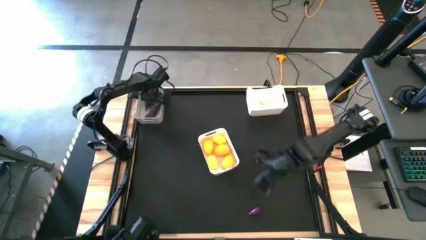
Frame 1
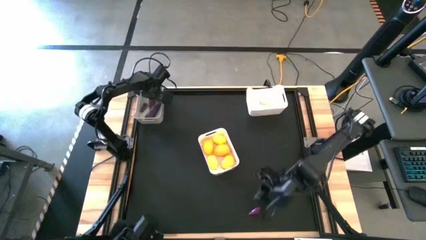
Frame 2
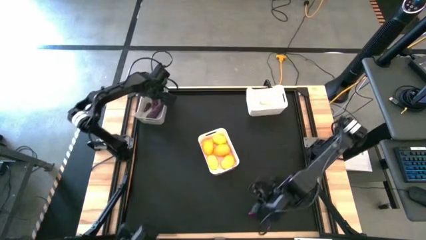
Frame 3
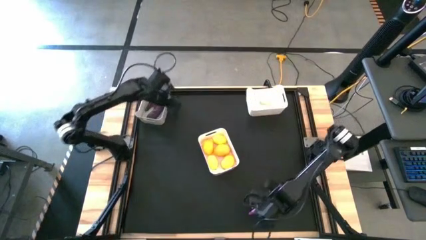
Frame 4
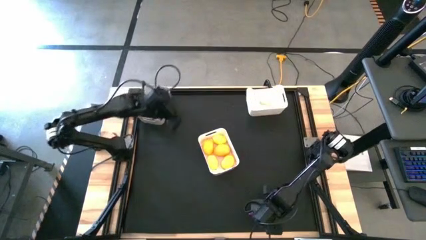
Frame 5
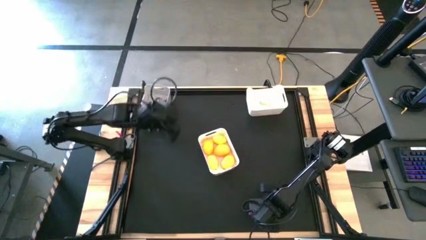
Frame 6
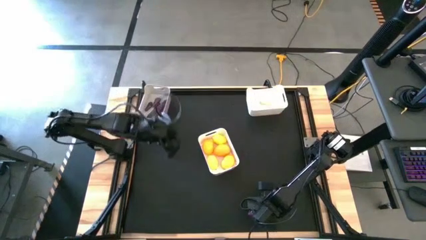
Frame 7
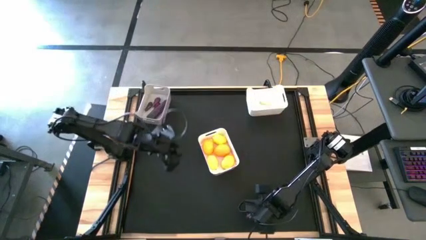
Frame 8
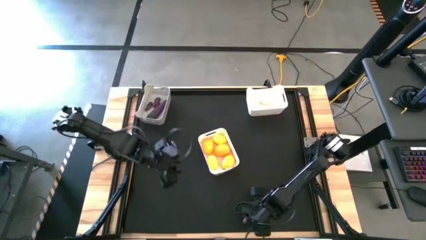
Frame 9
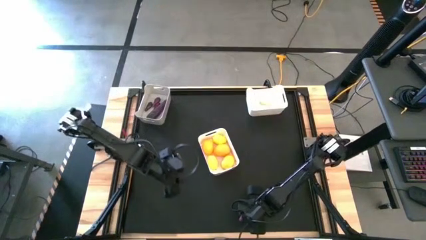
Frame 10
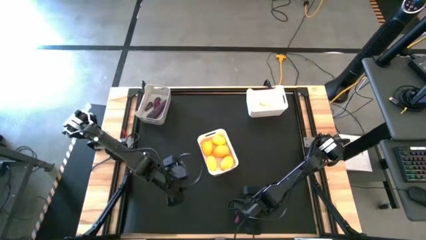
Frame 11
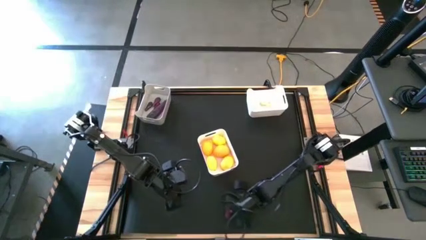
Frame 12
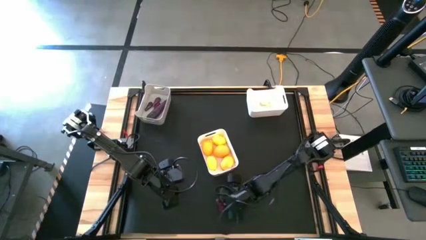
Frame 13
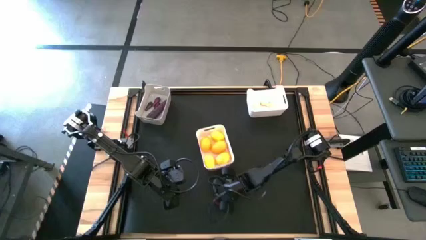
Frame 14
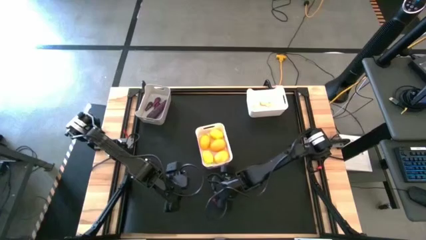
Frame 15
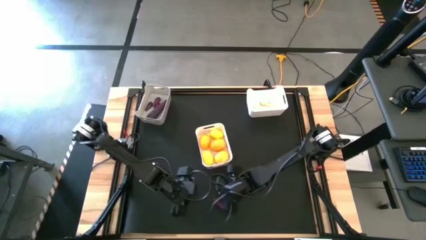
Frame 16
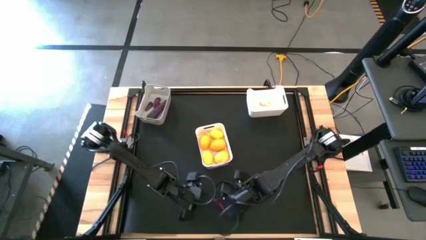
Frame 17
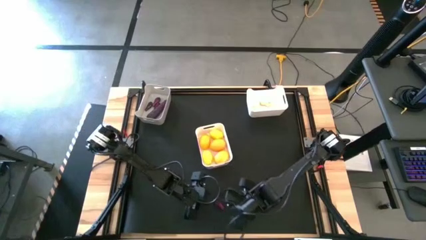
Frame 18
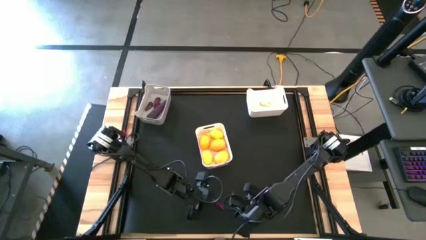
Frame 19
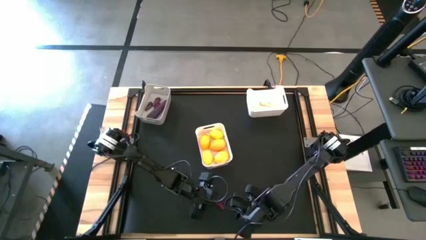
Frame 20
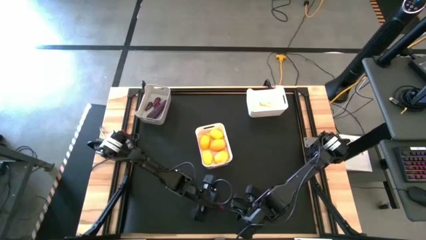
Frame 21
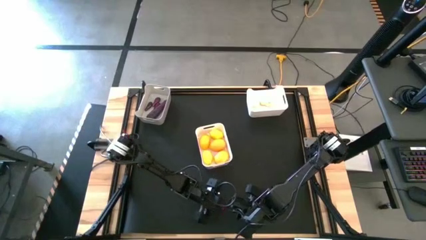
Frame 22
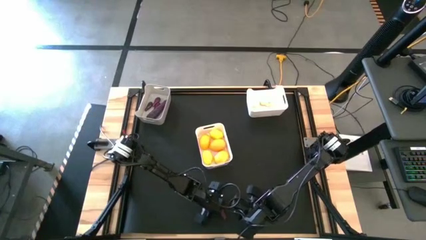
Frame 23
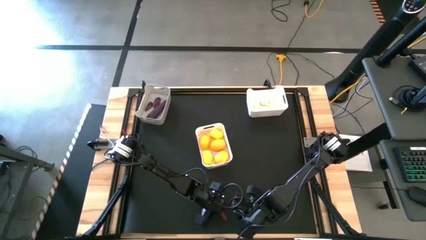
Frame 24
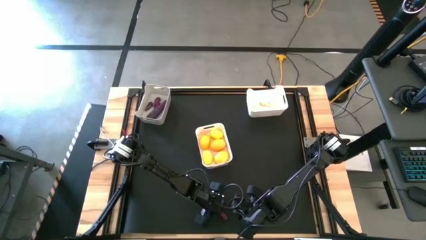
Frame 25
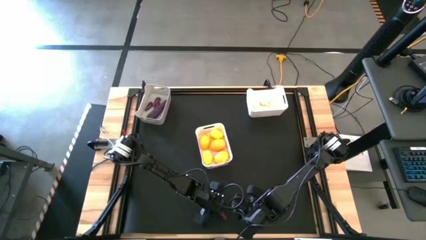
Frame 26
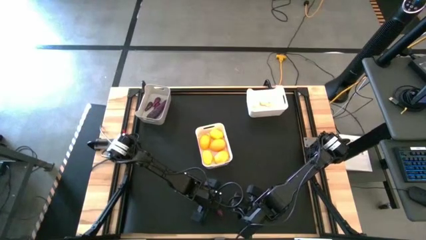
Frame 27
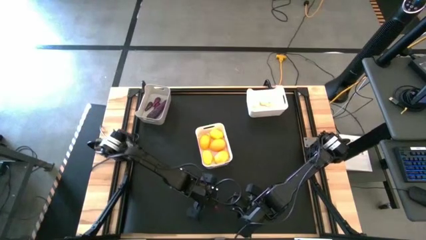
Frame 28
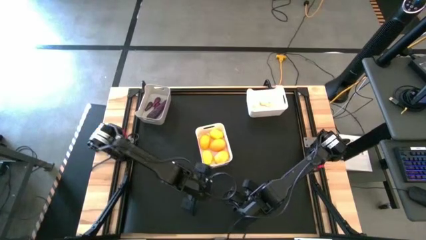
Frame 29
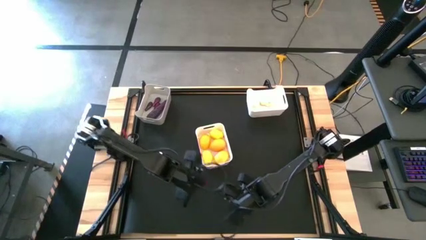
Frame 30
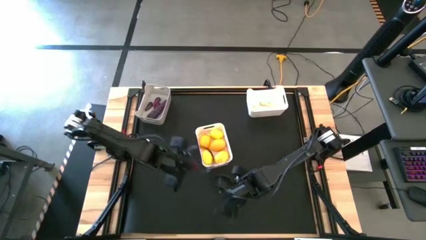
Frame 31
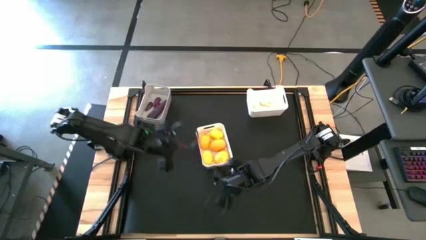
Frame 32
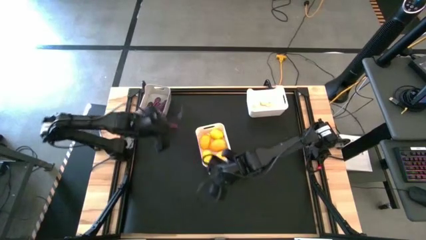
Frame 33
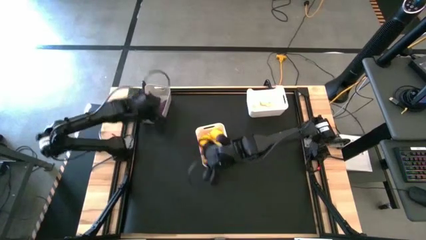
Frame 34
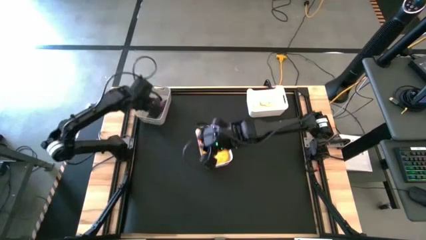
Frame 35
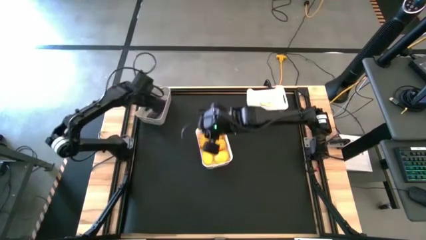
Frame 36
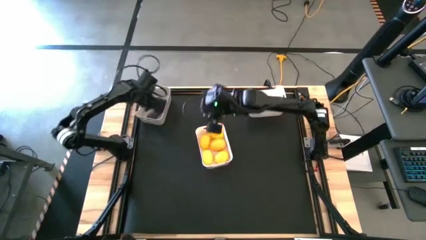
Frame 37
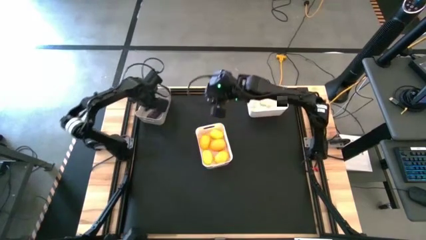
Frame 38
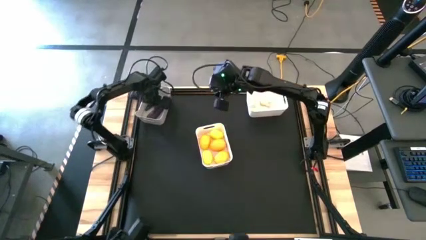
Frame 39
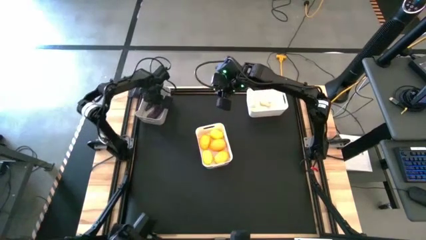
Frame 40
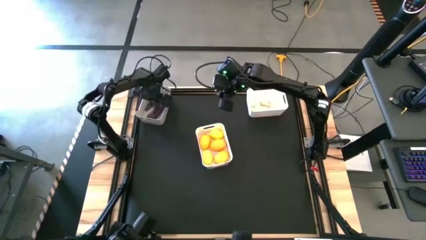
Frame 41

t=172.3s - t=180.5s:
Task: Sort produce into baskets
Put the eggplant into the gray bin

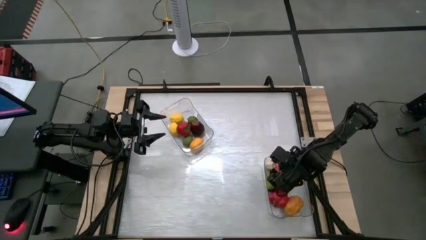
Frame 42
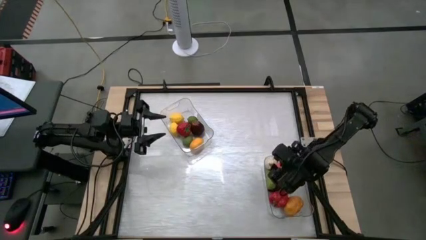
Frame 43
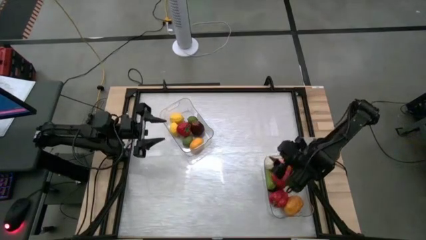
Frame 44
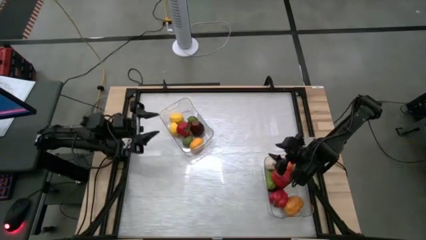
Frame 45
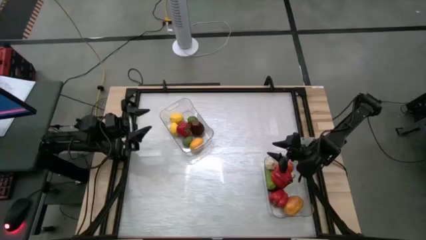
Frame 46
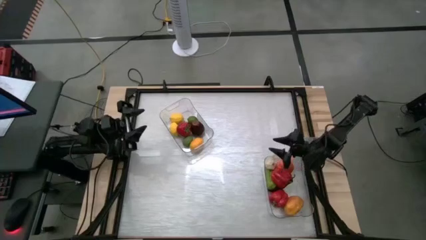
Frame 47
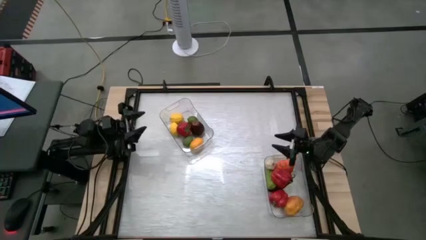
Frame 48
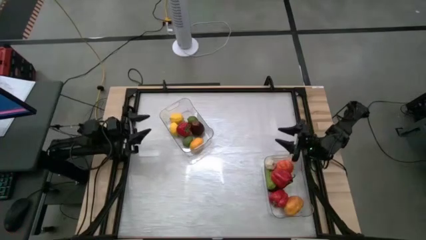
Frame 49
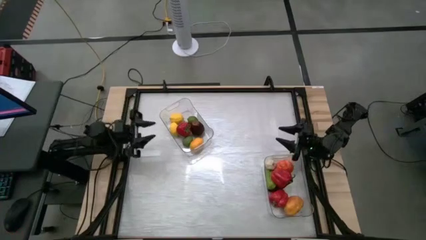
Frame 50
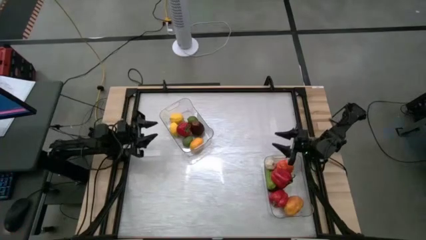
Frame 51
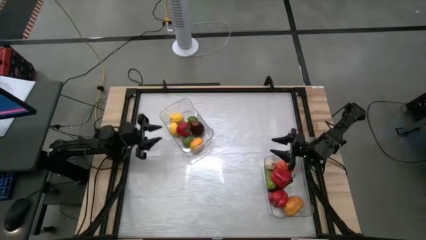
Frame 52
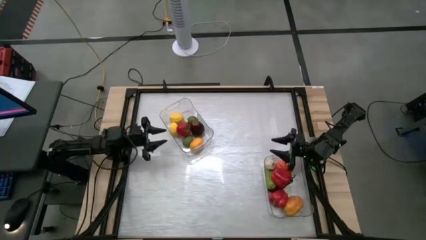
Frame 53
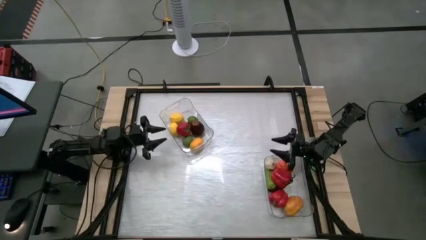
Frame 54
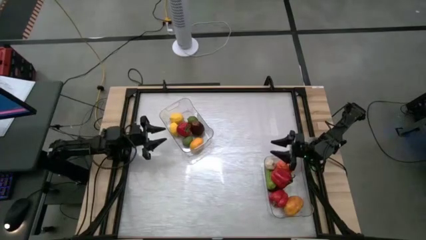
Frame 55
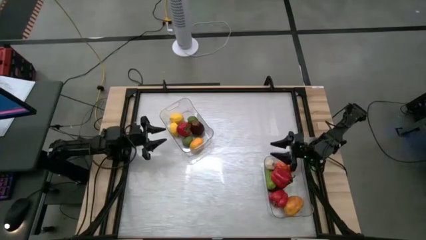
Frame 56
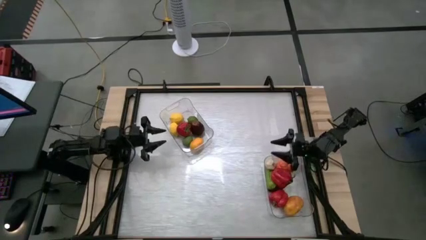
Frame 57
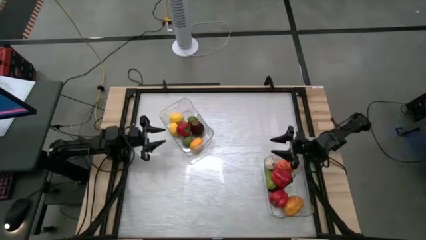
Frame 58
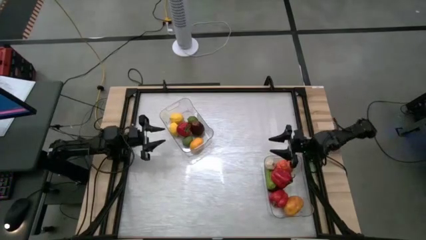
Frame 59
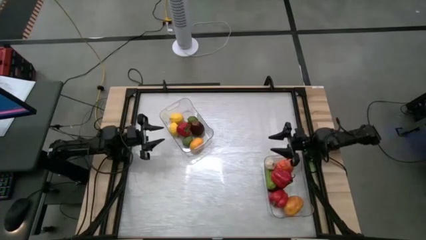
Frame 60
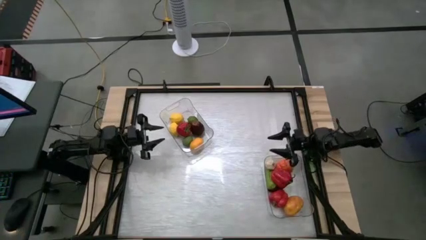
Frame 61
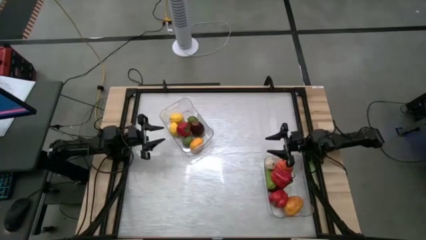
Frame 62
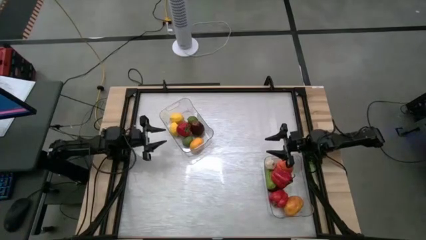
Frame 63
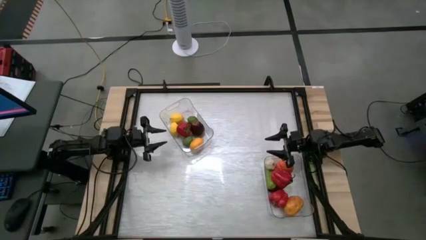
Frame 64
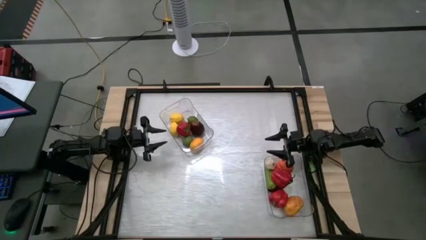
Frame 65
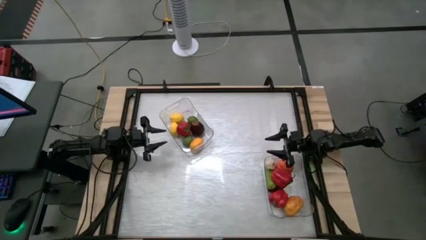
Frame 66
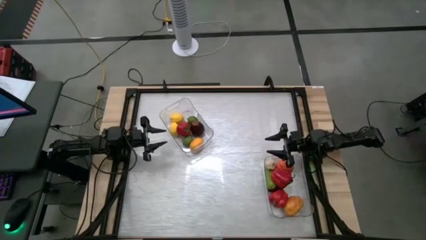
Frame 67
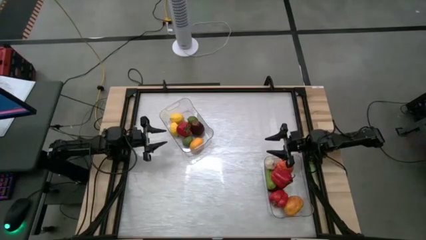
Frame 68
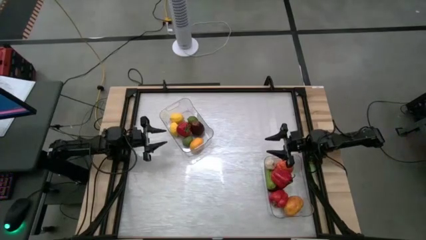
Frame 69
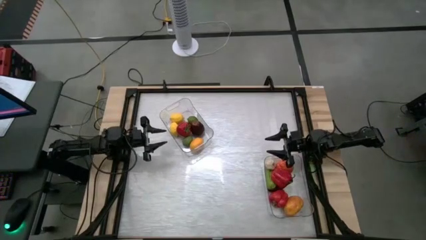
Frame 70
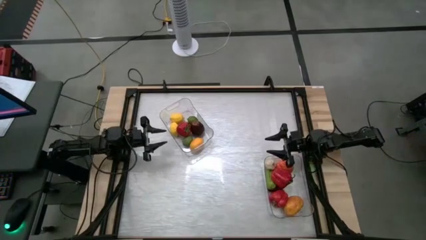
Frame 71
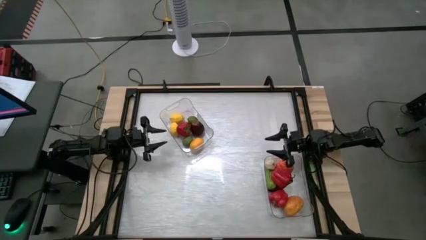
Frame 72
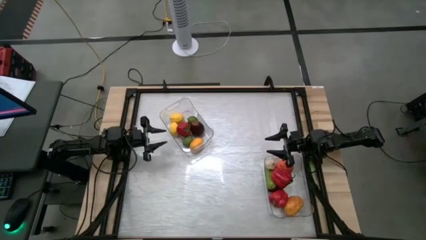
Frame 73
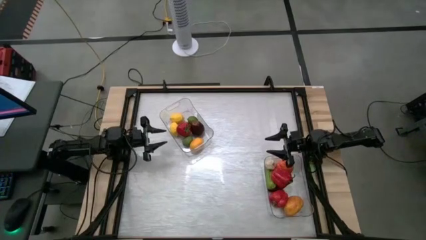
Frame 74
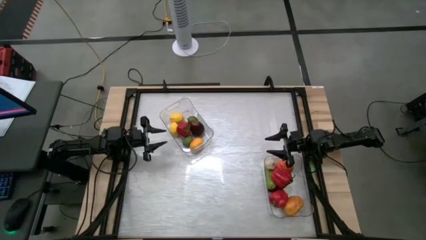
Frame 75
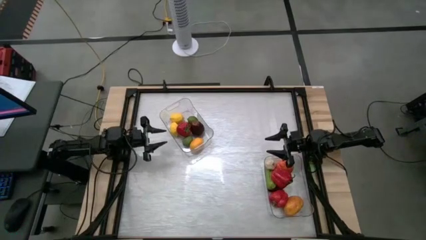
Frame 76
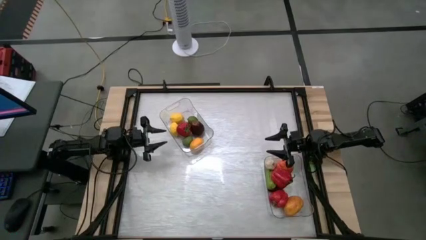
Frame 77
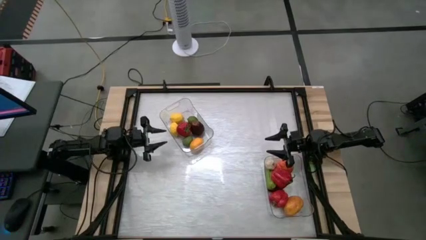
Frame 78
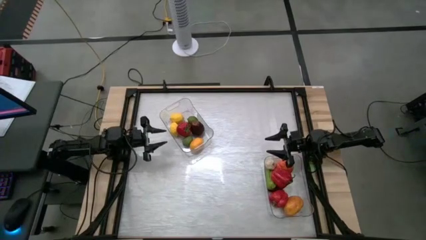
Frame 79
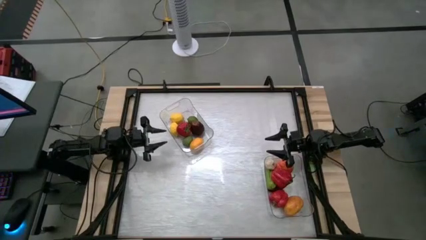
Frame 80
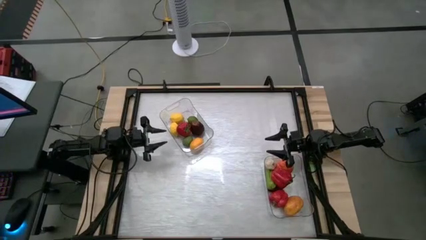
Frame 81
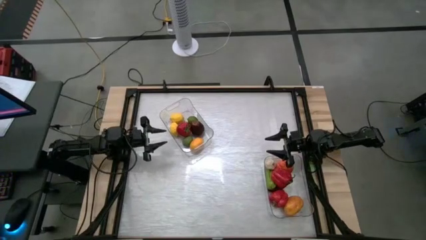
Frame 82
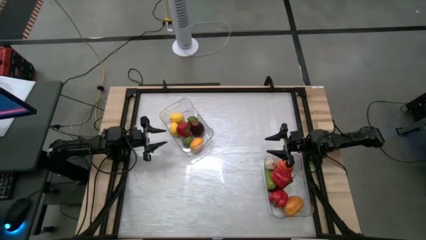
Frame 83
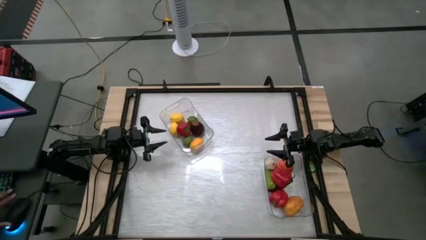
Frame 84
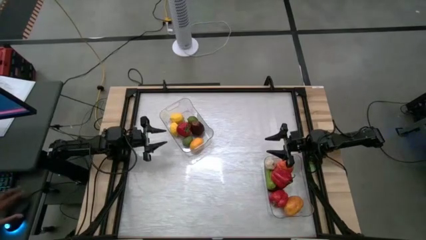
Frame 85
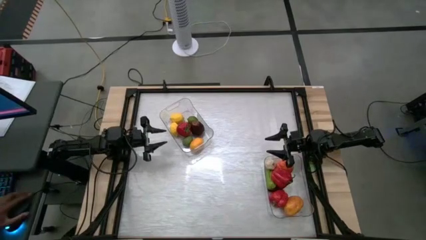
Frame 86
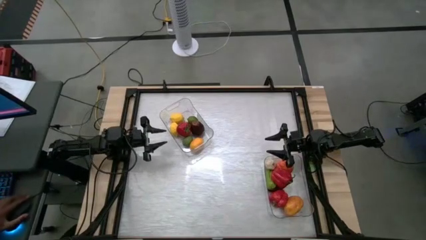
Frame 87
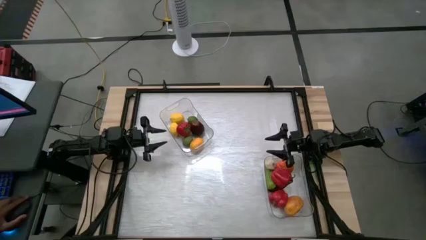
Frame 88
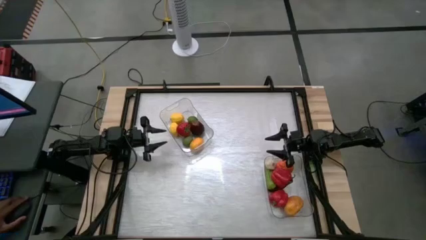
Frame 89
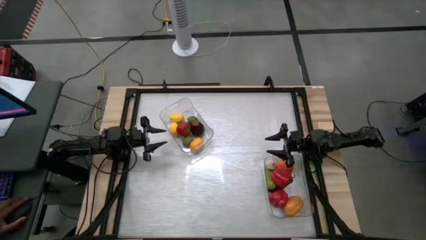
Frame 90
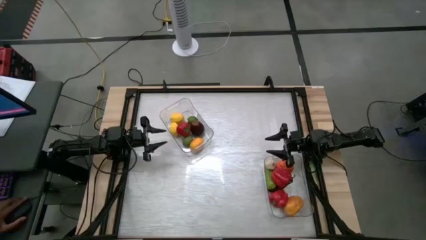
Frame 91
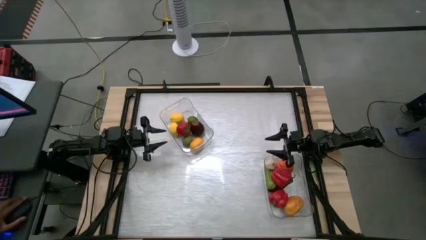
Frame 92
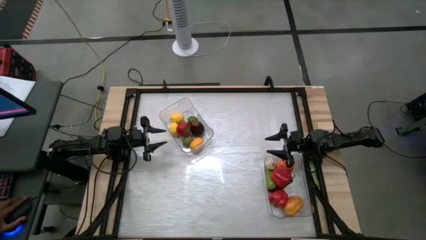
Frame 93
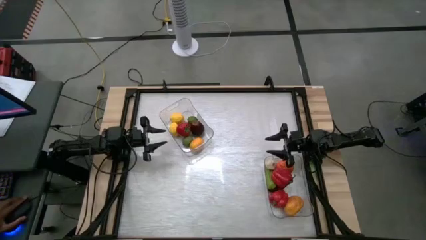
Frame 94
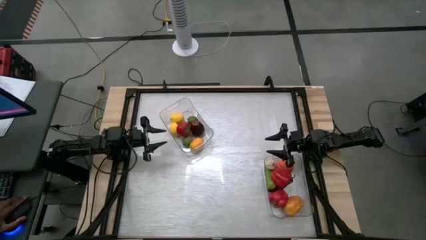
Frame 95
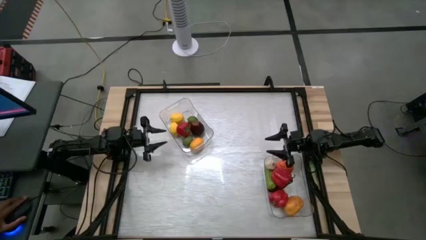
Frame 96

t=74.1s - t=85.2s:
Task: Sort produce into baskets
Return to Home Position
